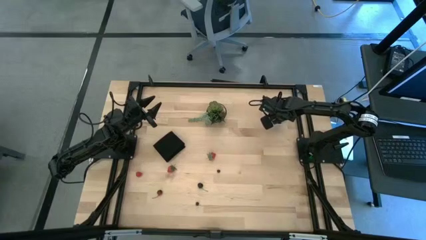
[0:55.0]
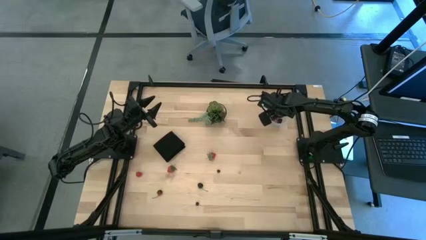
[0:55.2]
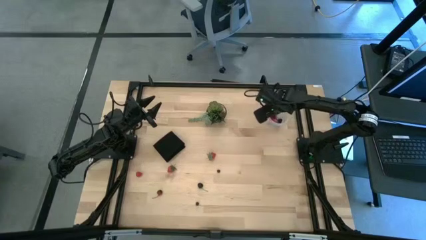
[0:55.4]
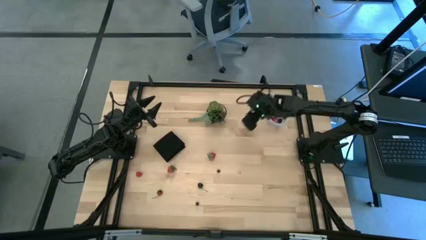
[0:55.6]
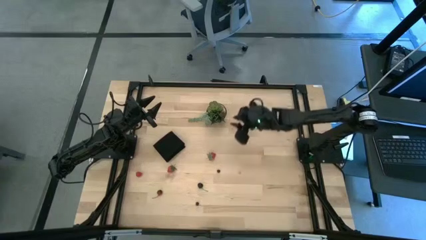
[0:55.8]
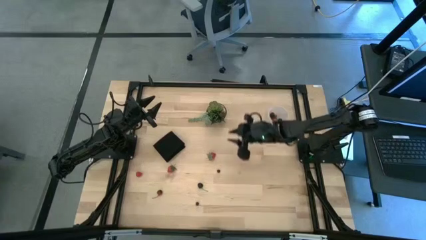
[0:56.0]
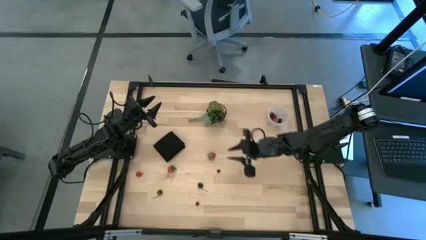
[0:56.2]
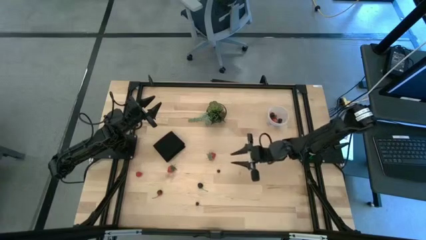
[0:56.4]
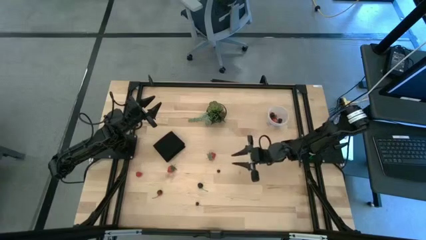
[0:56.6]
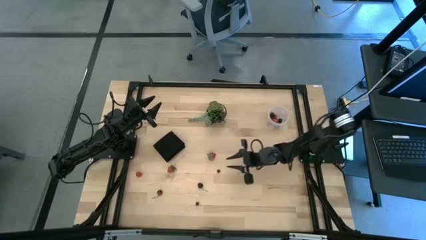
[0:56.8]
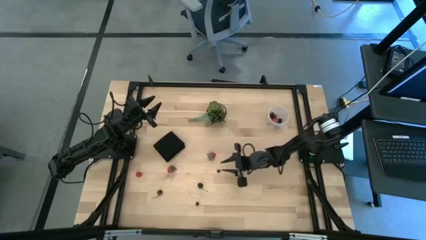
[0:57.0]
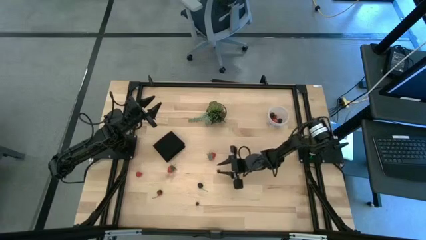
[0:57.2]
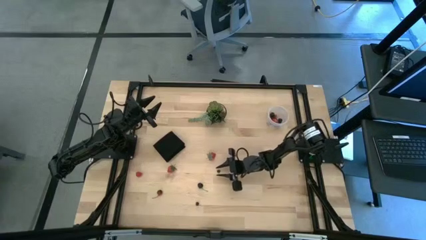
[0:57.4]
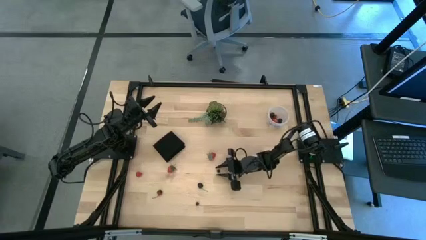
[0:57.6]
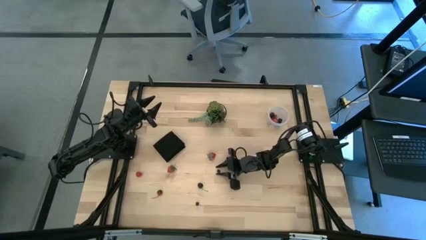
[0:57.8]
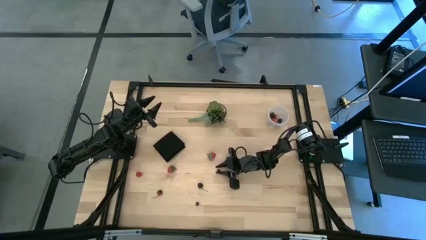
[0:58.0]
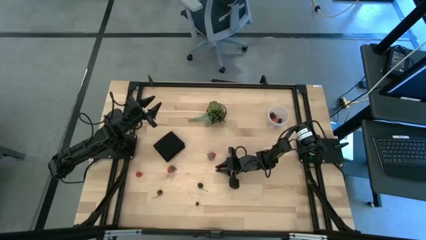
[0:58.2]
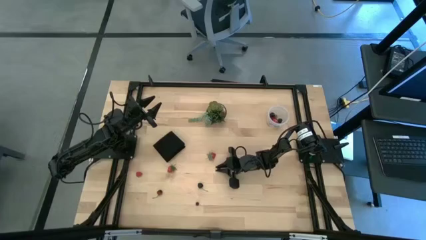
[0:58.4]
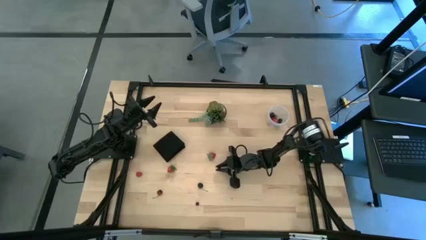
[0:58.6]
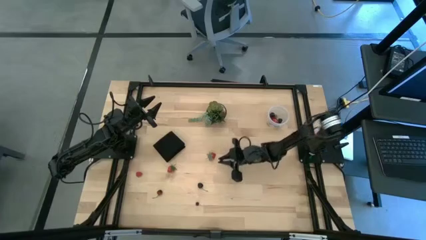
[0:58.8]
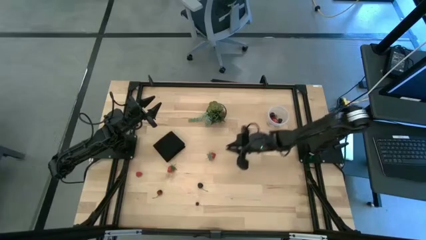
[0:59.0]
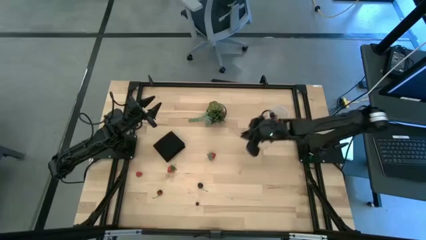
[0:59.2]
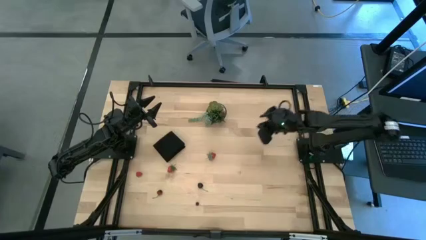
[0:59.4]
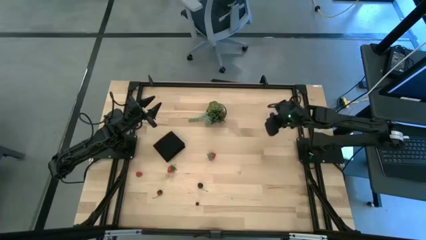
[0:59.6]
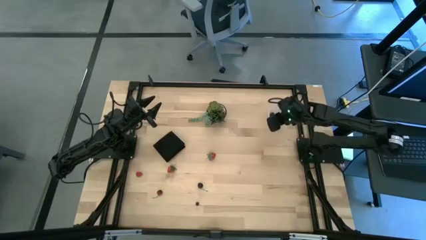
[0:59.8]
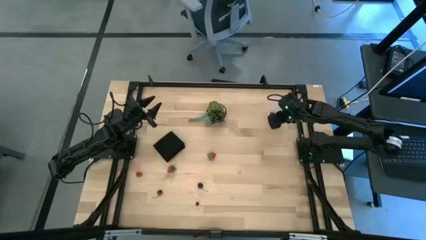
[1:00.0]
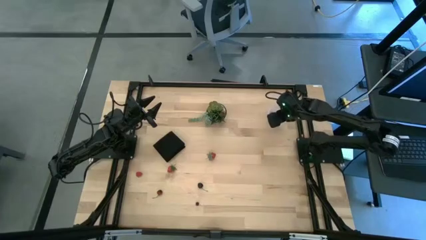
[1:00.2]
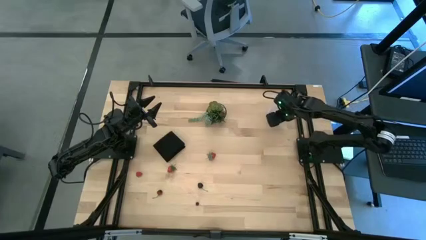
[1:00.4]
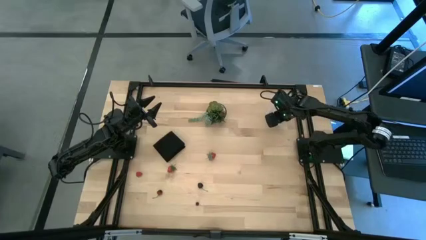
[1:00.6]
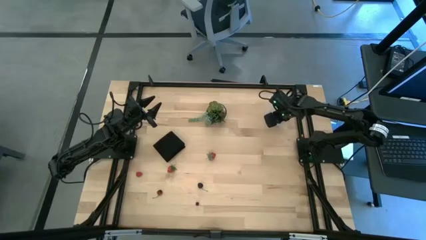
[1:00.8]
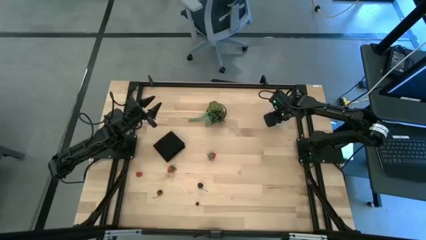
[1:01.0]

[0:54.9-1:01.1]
Task: Pick and placing Produce into tupperware
Put the top blueberry into the bin

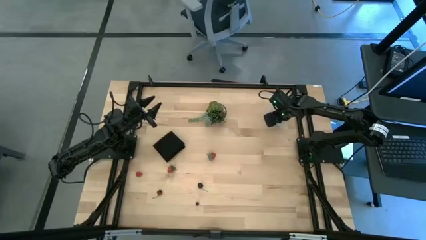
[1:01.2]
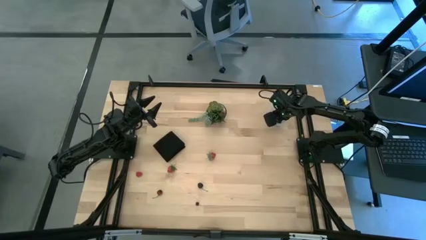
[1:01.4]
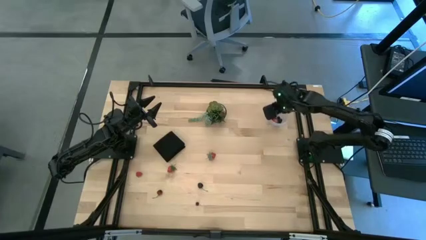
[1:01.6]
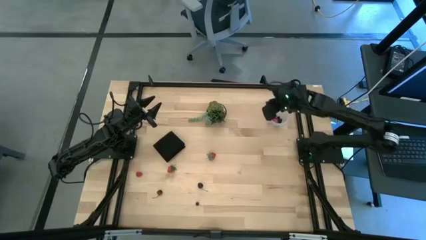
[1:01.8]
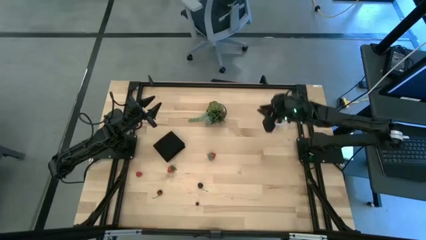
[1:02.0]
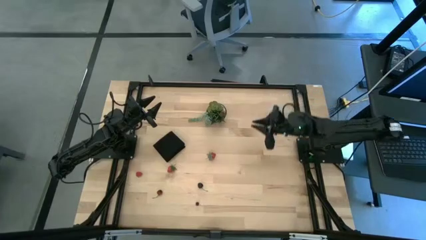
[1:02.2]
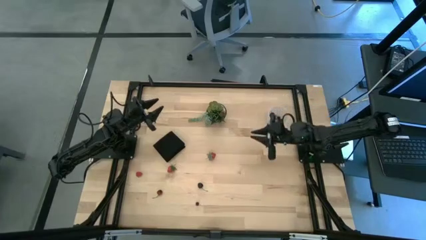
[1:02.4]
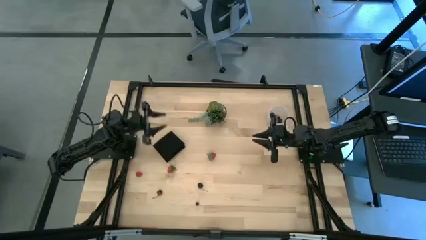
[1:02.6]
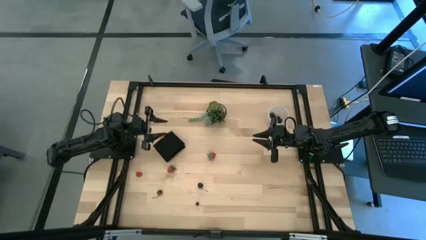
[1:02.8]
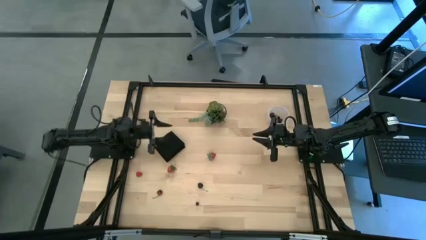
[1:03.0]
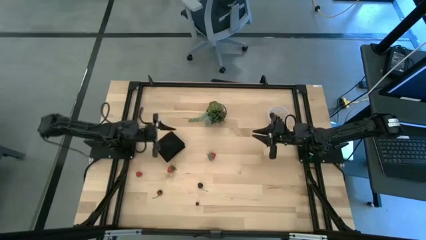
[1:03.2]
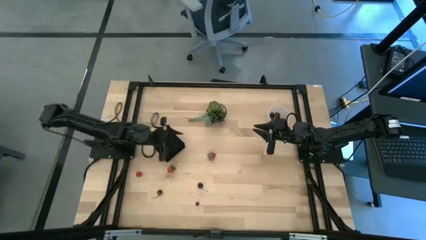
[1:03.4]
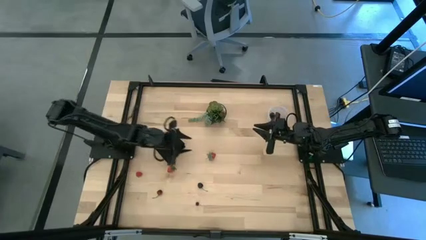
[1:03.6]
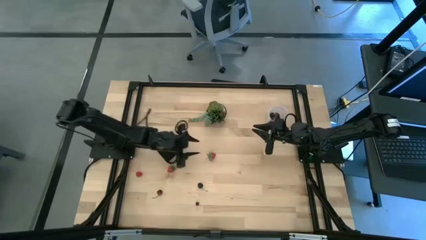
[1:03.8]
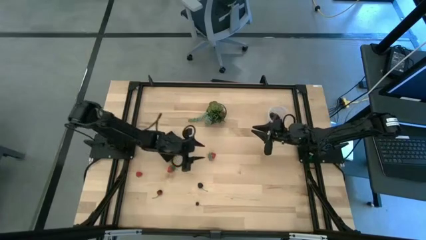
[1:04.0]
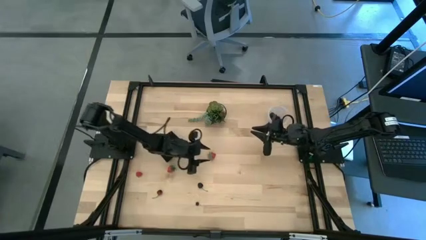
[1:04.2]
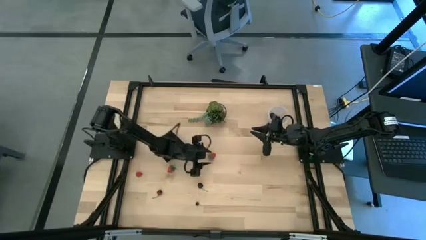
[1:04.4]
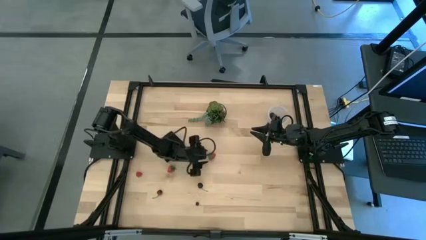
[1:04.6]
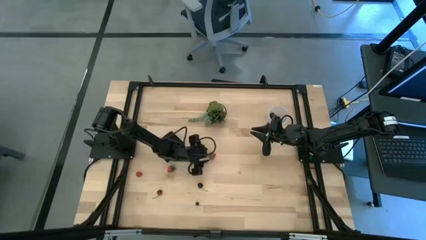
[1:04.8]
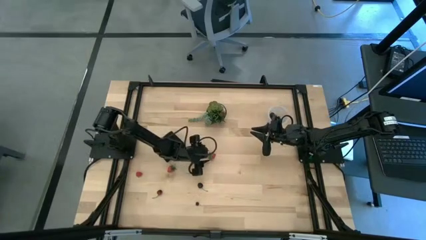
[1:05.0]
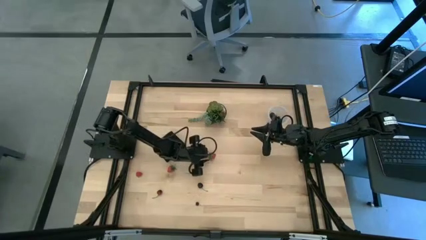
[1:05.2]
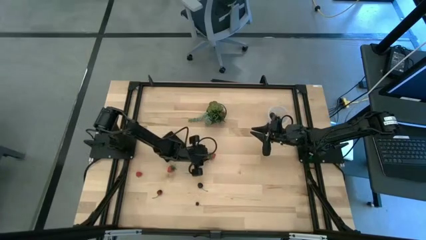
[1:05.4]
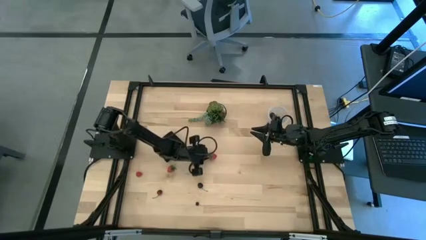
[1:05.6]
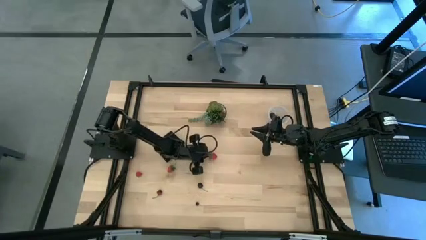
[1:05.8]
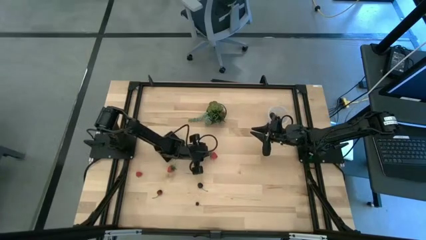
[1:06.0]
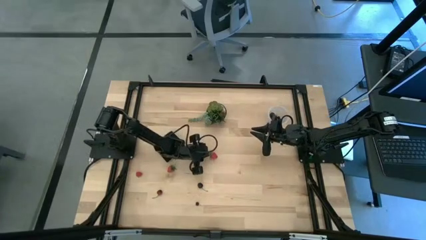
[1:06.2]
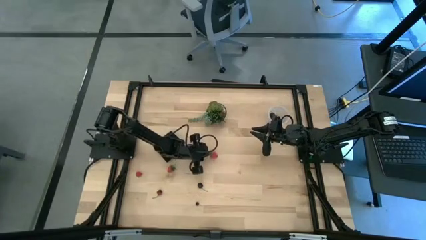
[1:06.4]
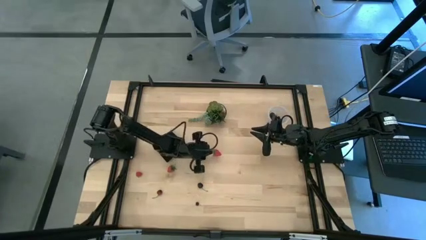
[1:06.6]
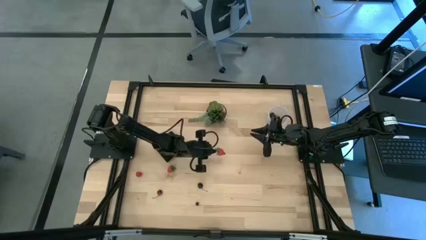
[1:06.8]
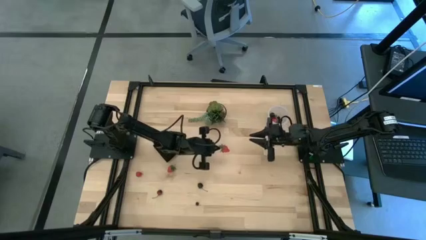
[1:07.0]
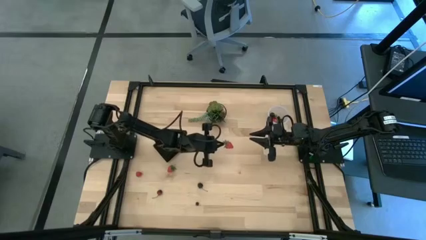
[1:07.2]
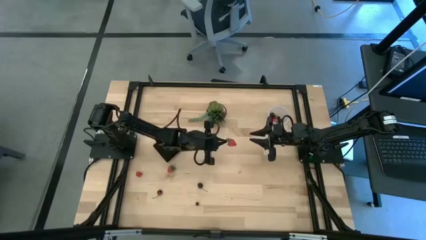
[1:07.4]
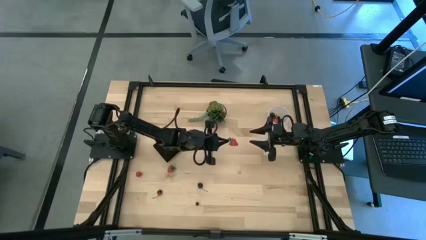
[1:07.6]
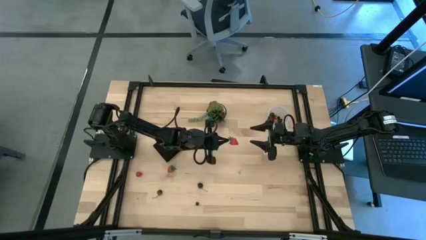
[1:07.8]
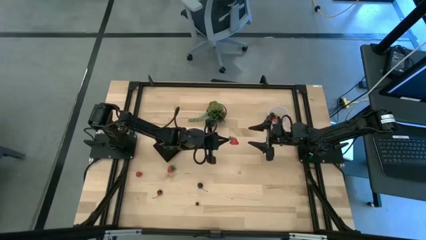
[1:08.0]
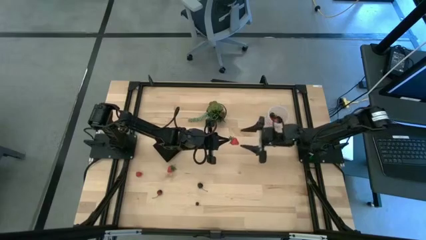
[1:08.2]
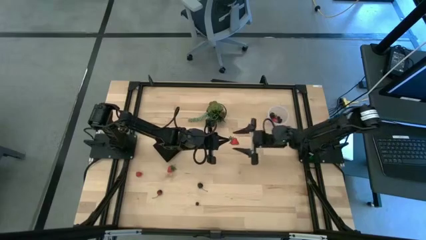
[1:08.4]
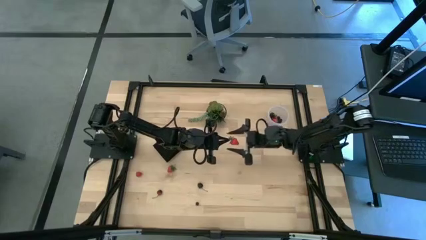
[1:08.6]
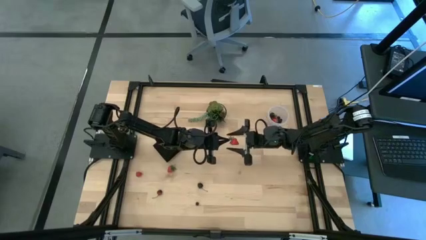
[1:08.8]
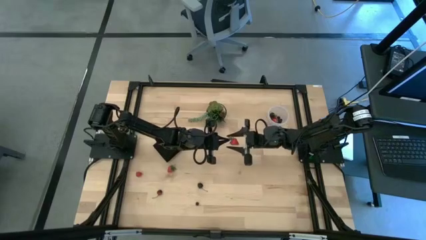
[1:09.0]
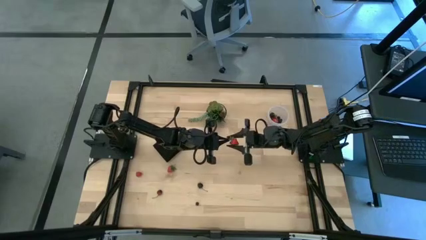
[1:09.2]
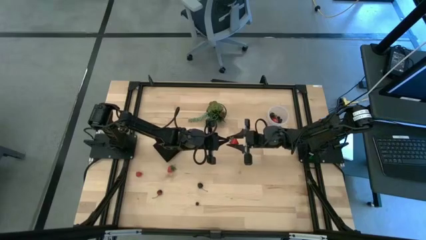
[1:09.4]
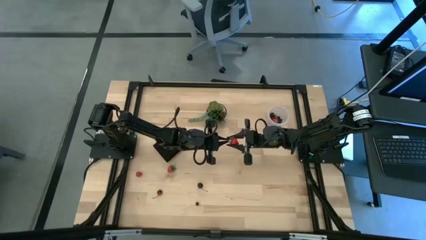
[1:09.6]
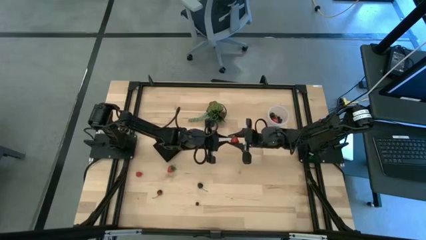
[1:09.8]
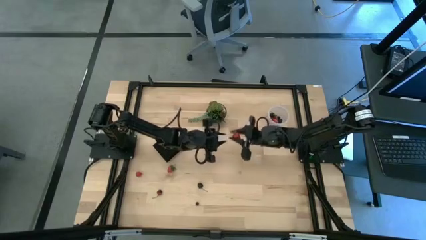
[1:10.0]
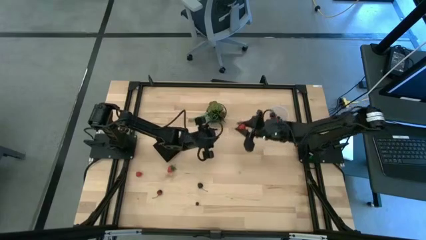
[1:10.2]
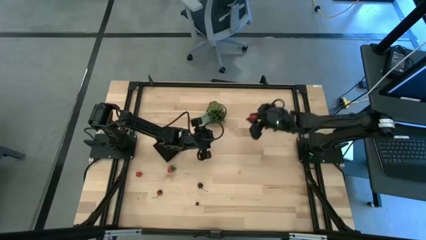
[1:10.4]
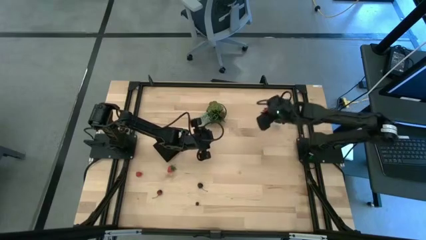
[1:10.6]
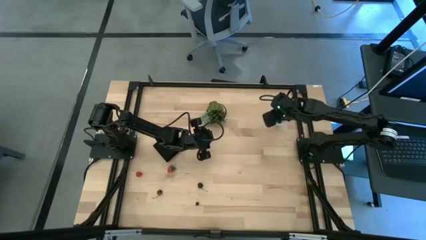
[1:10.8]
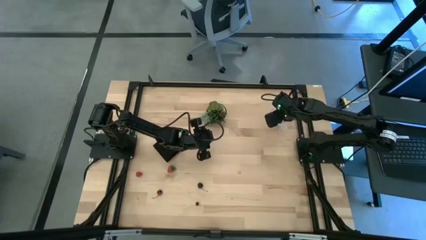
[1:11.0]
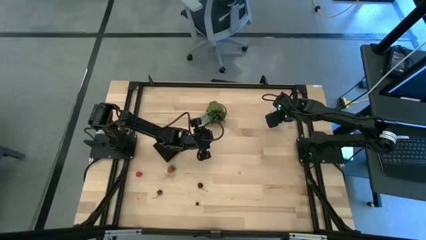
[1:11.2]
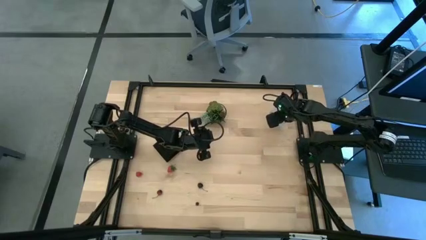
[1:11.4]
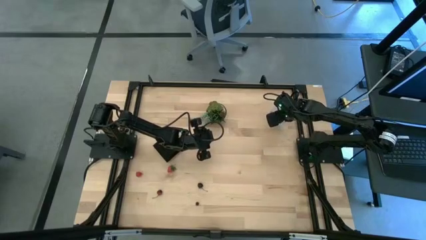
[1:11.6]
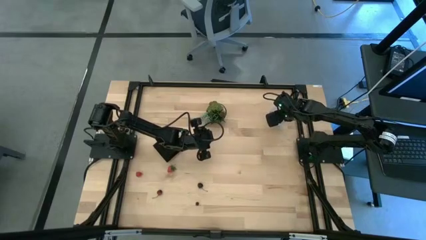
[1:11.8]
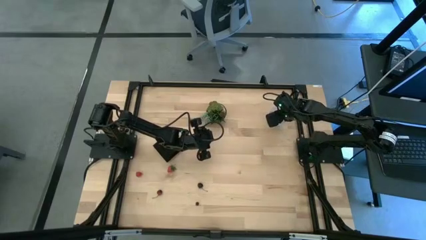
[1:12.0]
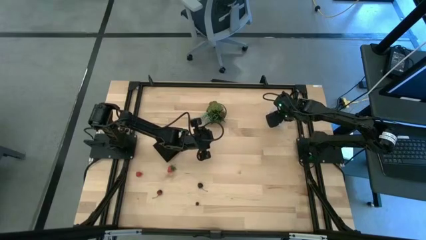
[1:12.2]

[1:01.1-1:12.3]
Put the right red strawberry into the bin

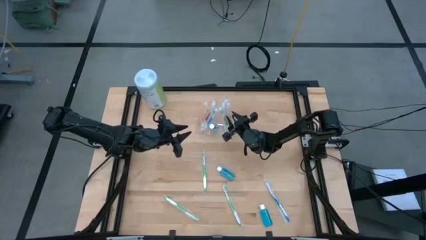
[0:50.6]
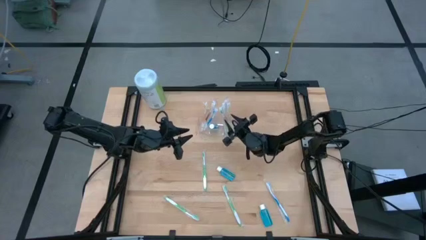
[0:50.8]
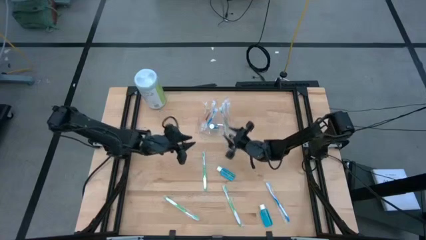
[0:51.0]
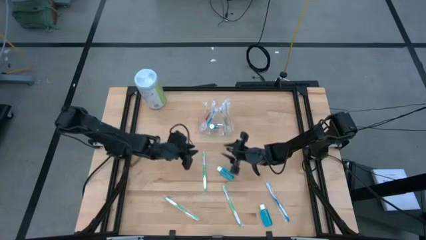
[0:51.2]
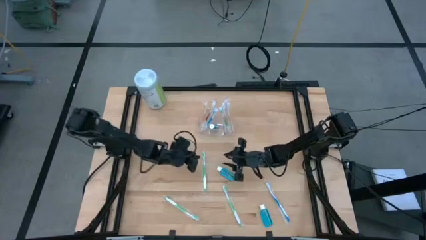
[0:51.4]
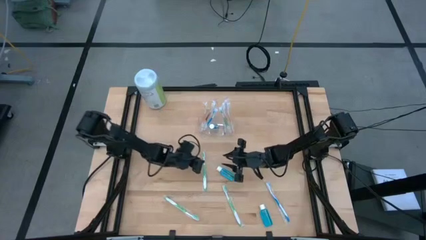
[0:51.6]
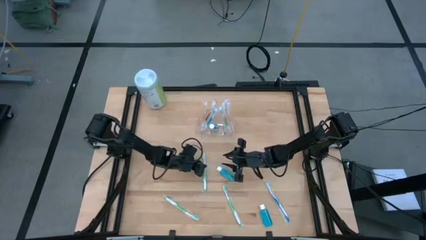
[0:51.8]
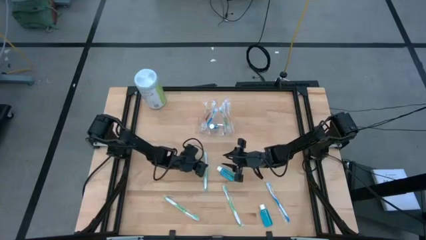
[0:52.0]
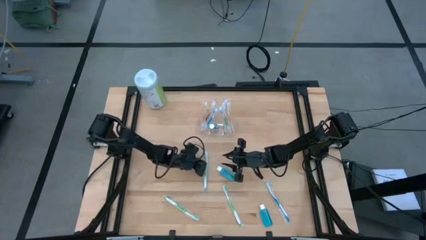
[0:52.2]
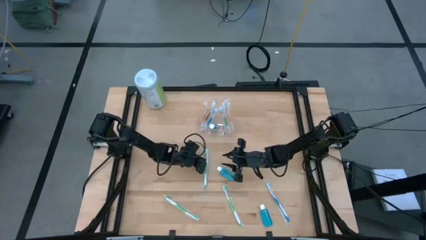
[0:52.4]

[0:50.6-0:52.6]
Task: Pick & Place toothbrushing station
Put the green toothbrush to the left of the transparent organizer
